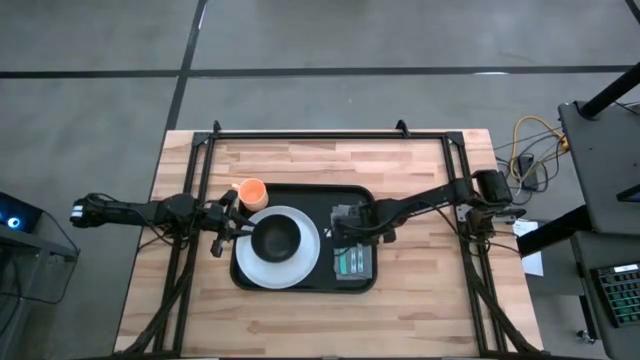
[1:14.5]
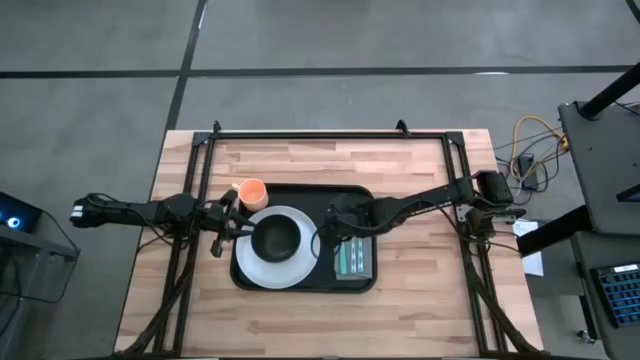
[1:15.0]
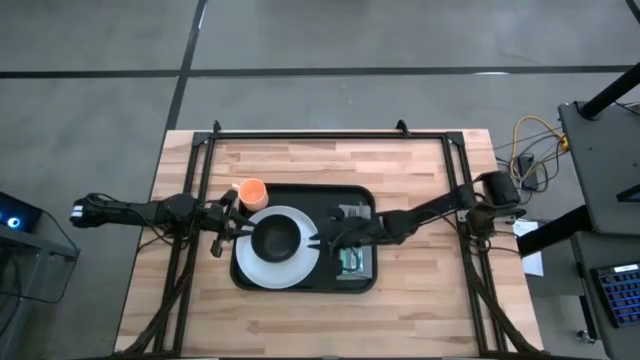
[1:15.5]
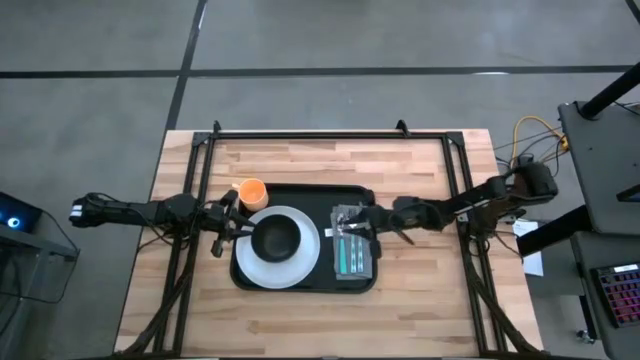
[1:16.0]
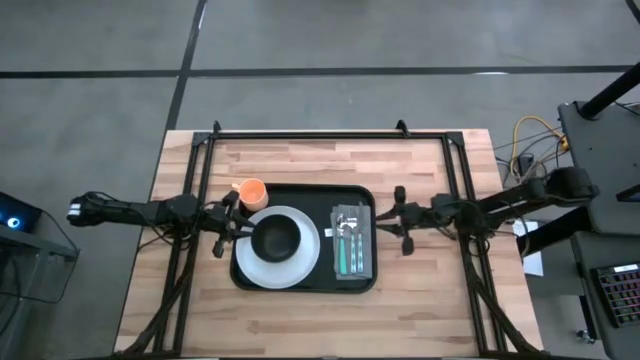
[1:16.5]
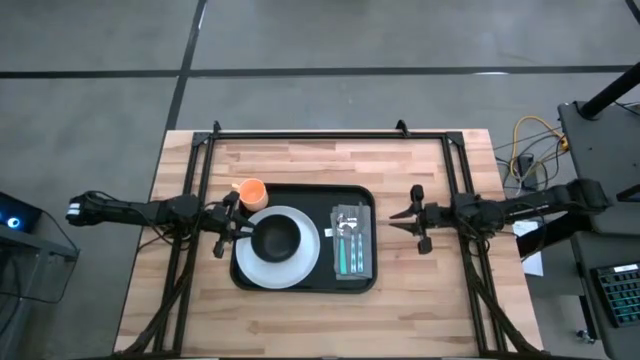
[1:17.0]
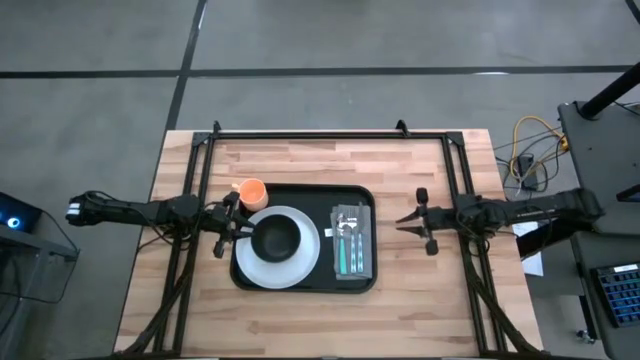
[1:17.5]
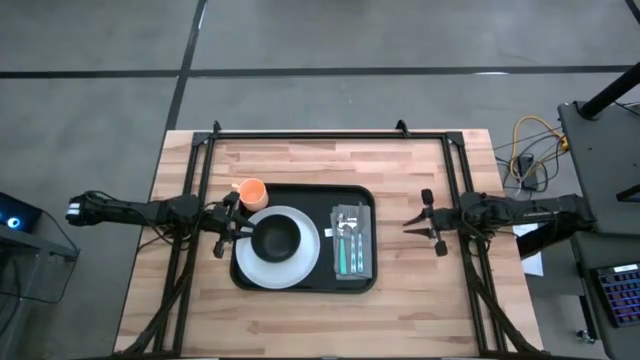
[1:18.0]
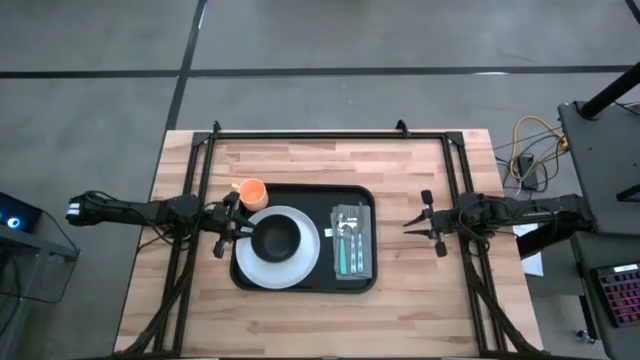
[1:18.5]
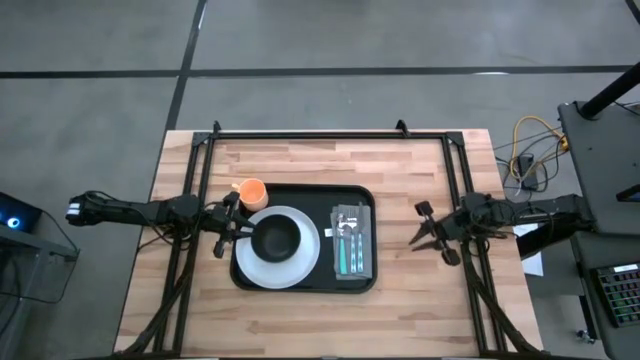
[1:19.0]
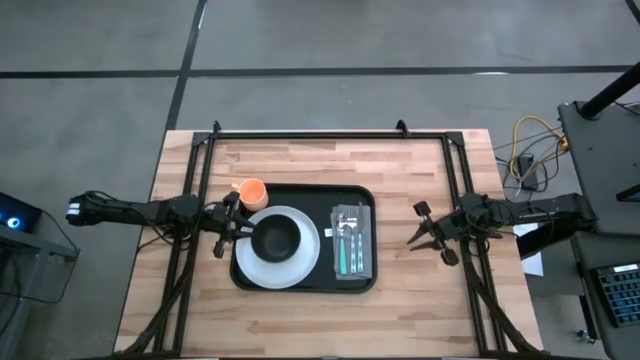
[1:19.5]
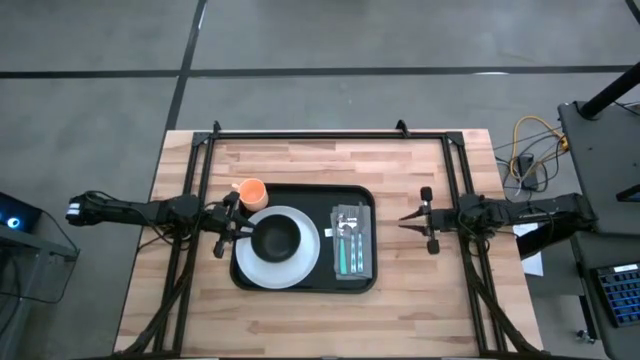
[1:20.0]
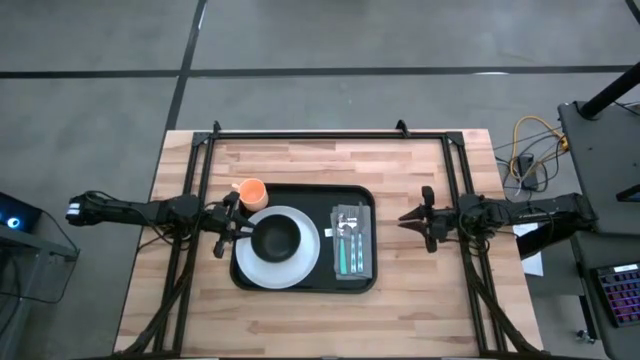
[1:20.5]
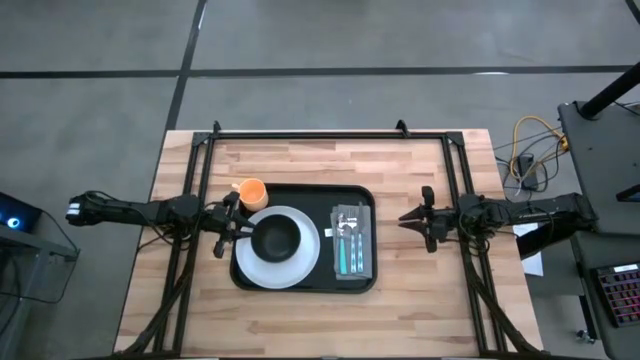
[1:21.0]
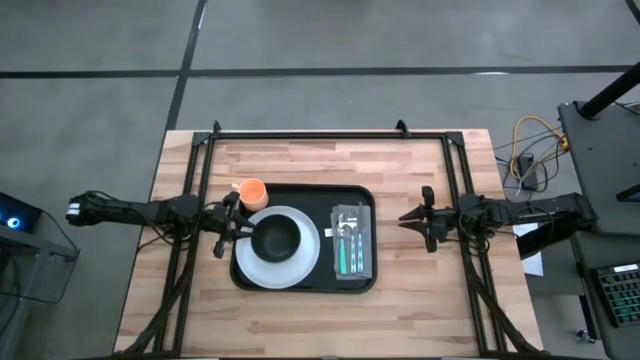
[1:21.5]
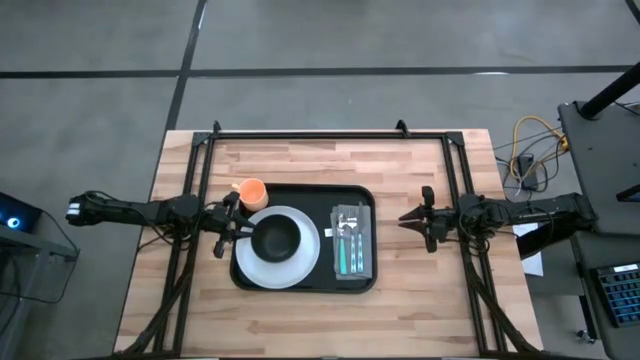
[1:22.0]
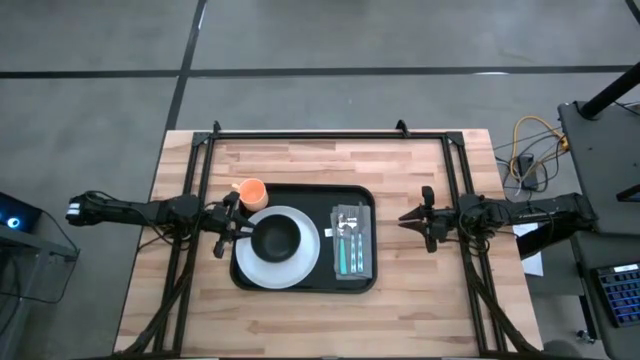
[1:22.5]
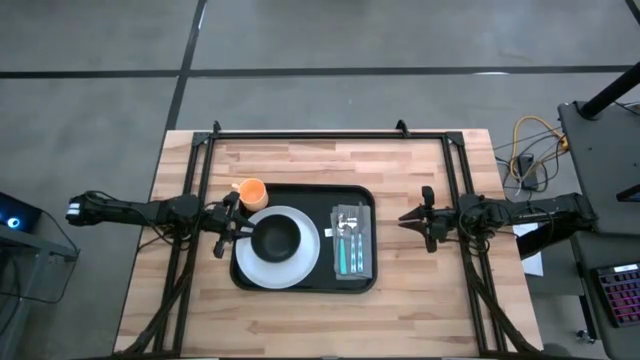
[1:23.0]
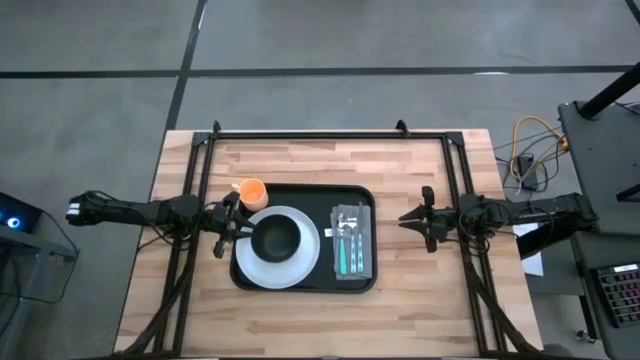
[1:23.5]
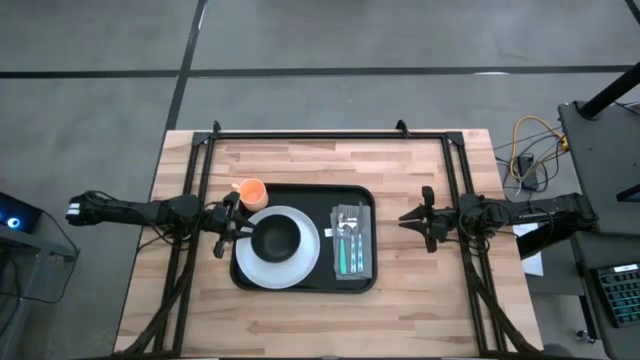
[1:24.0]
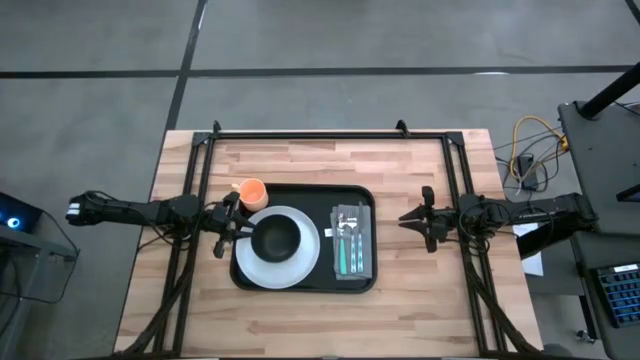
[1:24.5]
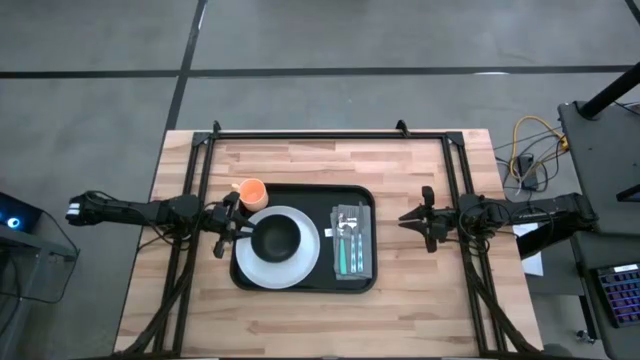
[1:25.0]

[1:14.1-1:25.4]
Task: Set up tray
Return to Home Position

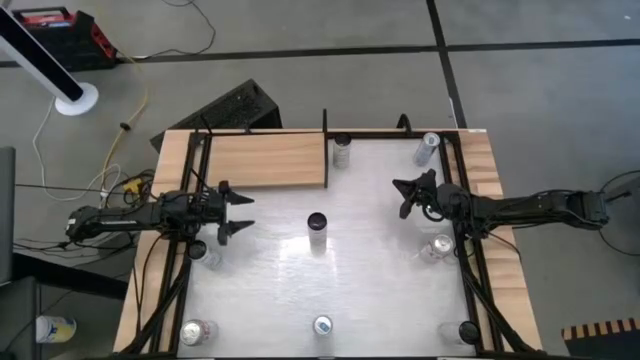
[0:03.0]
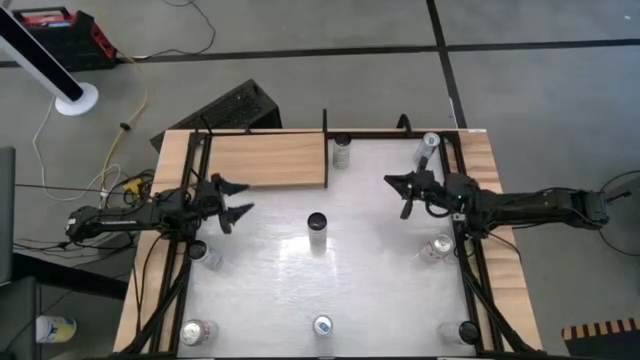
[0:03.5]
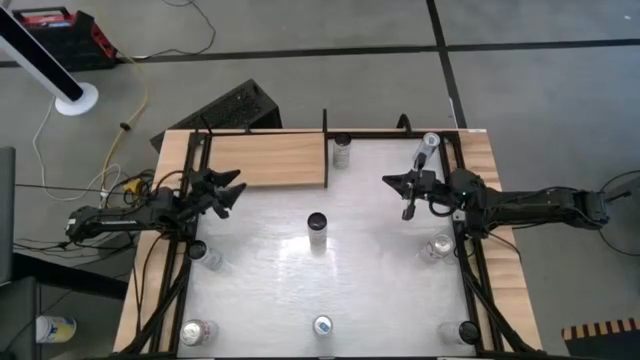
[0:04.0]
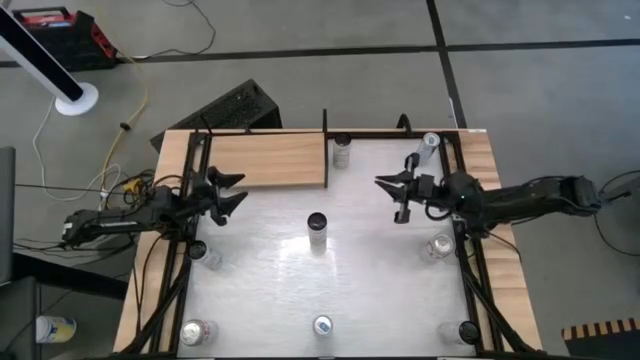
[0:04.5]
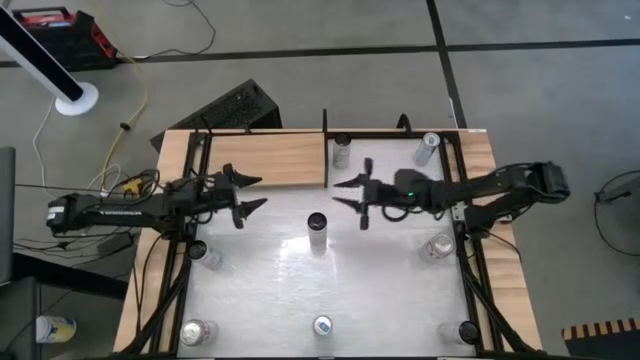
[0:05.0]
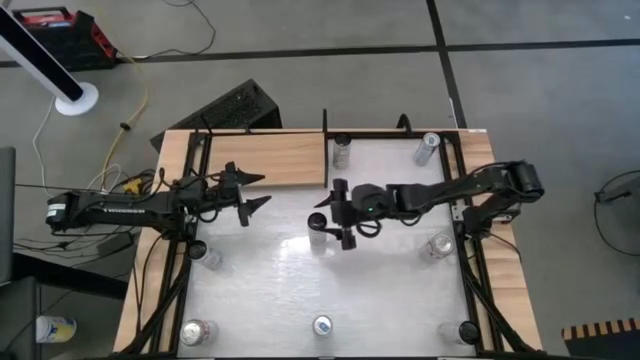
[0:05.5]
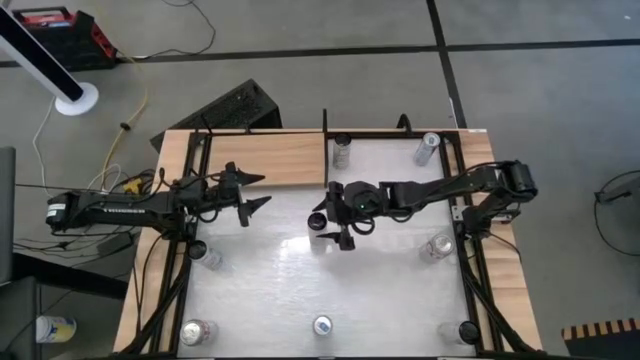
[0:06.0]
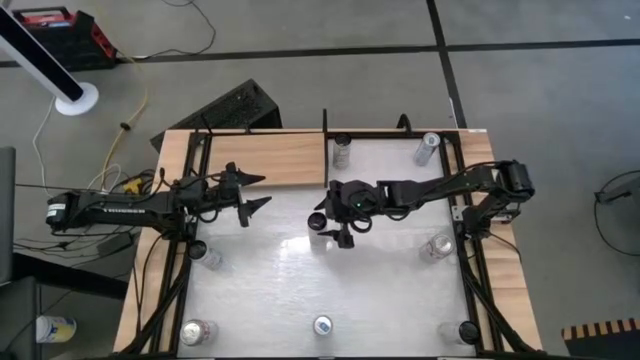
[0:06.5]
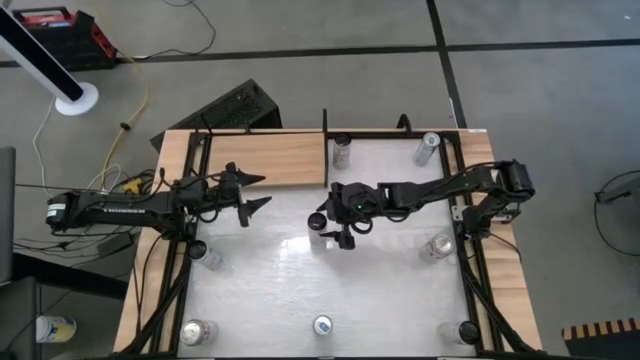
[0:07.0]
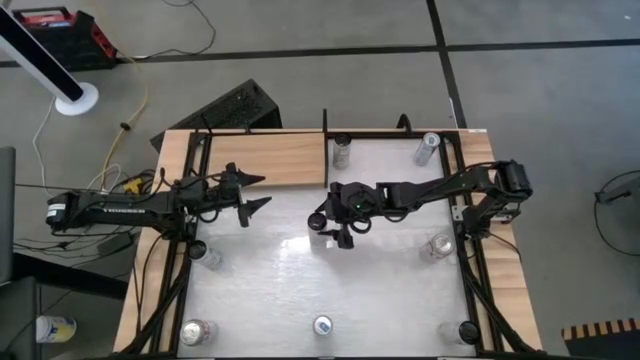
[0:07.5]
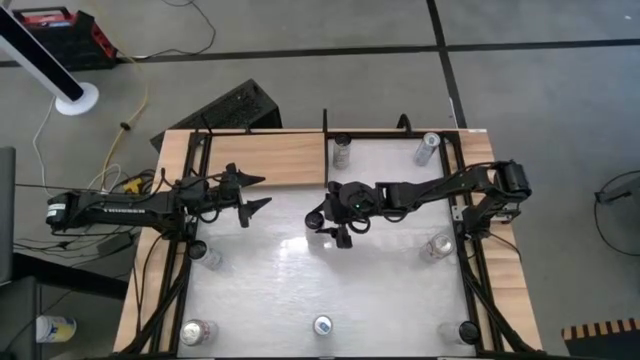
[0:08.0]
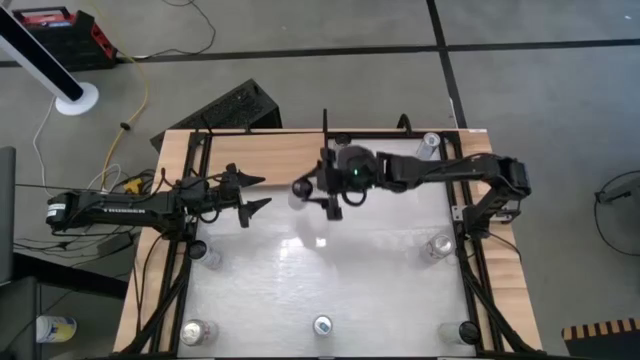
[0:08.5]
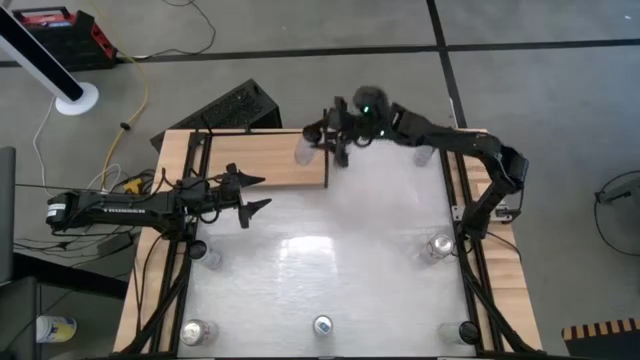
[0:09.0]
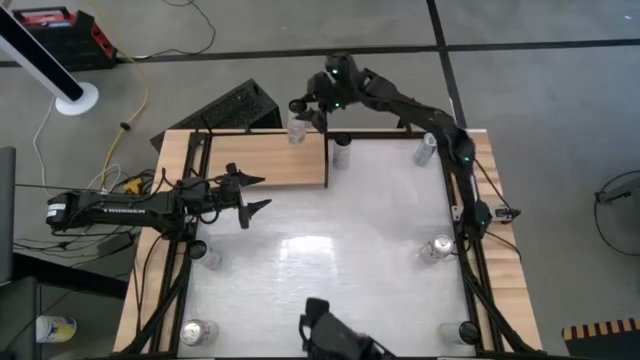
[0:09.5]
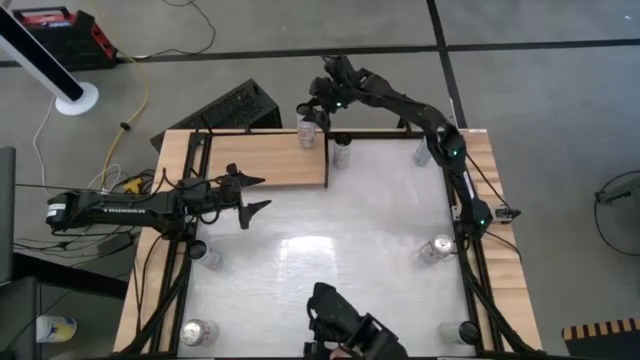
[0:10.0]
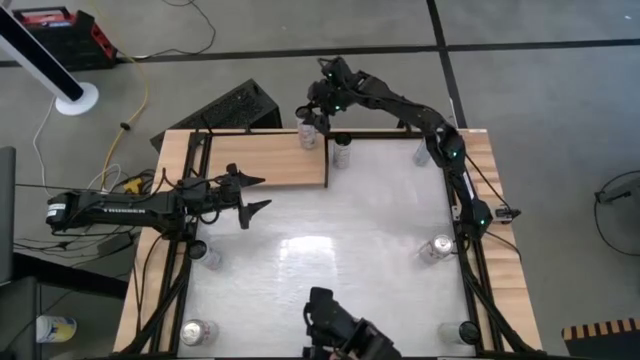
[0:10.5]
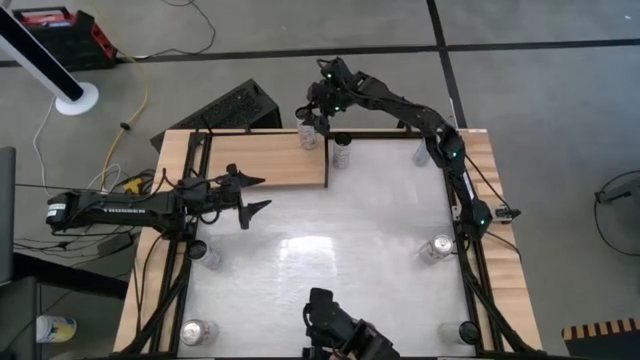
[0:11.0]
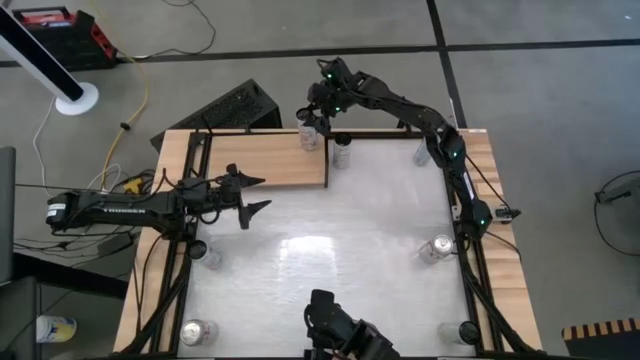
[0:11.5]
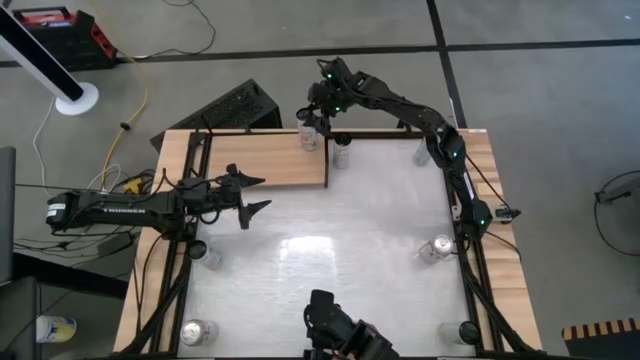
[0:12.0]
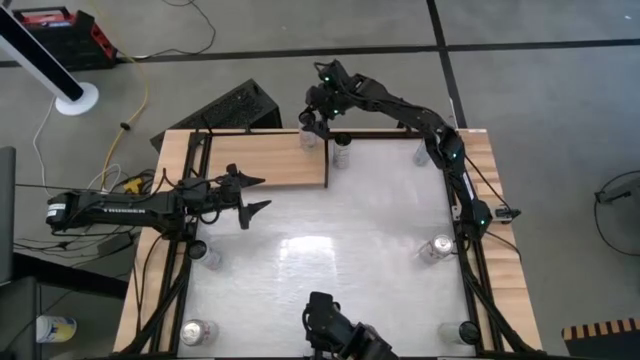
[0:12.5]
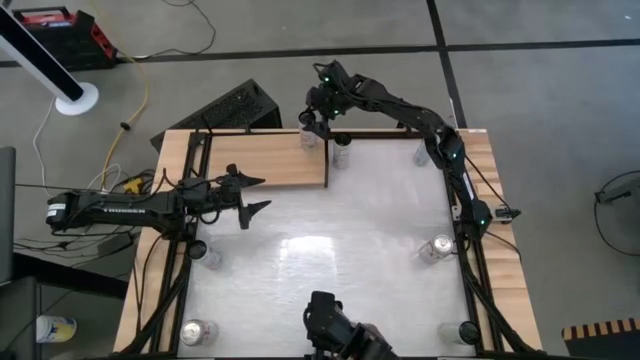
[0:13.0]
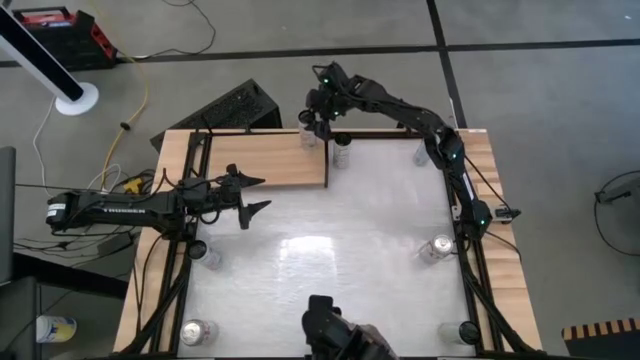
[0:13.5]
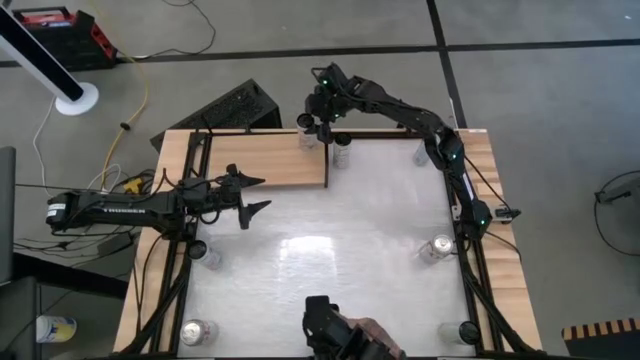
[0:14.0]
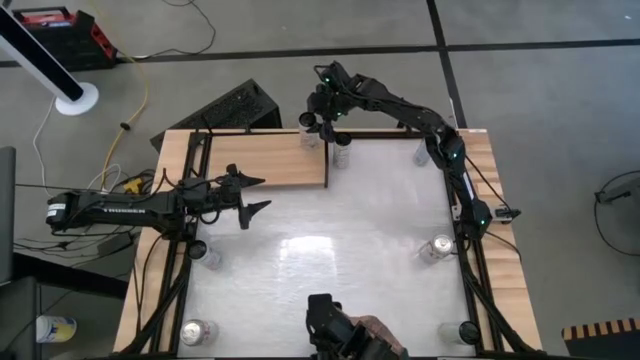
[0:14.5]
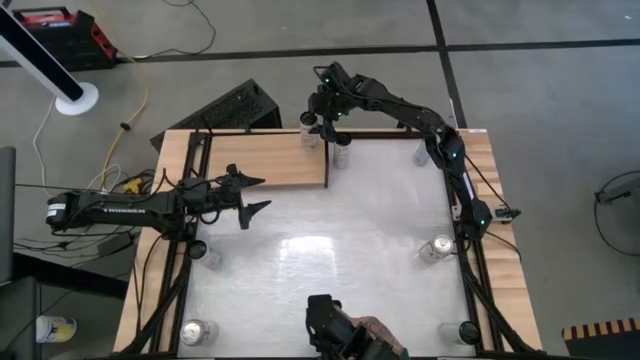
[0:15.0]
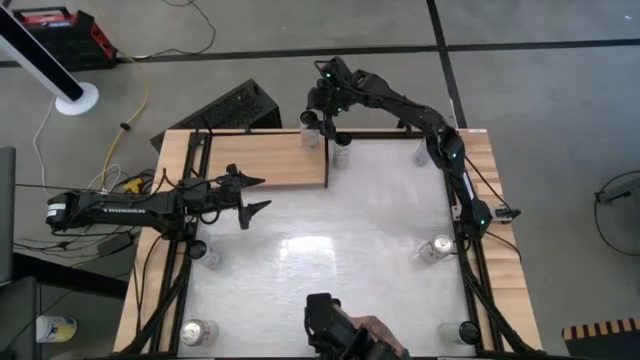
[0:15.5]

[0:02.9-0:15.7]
Task: Place canned beverage on shelf
Put the right peach vibe celsius soda can on the shelf
